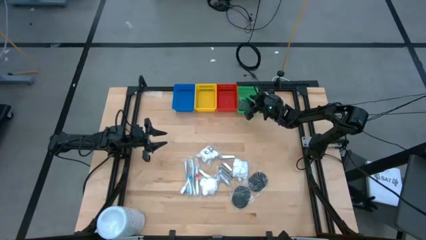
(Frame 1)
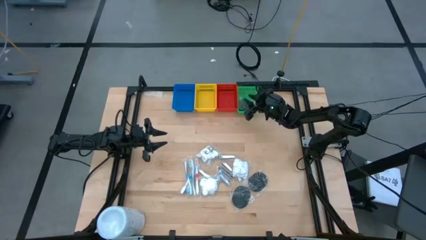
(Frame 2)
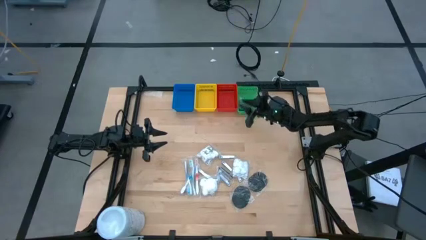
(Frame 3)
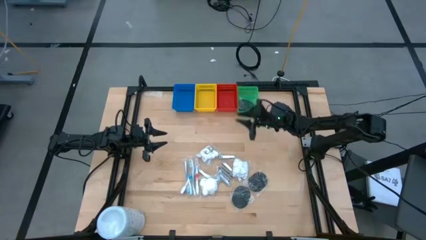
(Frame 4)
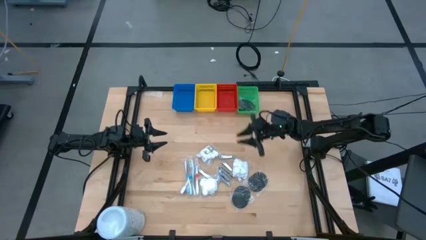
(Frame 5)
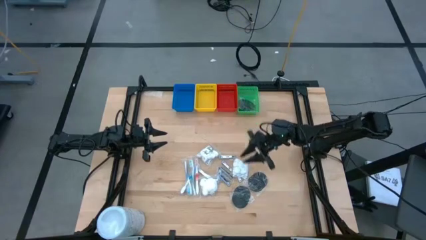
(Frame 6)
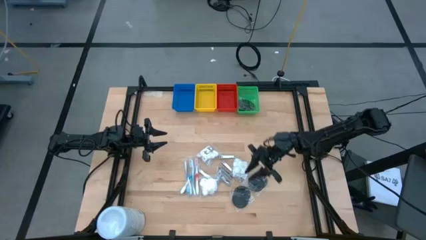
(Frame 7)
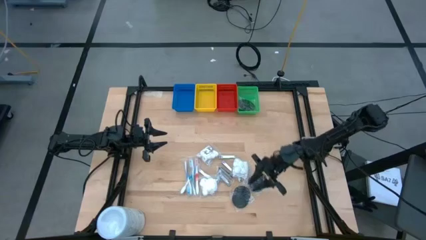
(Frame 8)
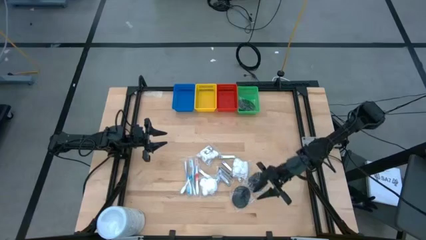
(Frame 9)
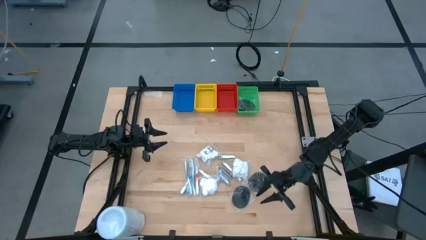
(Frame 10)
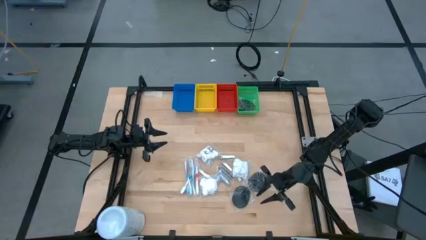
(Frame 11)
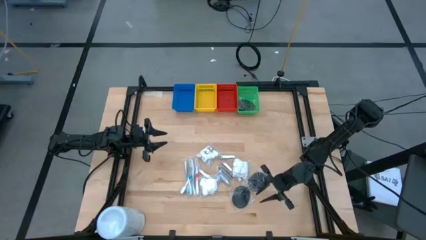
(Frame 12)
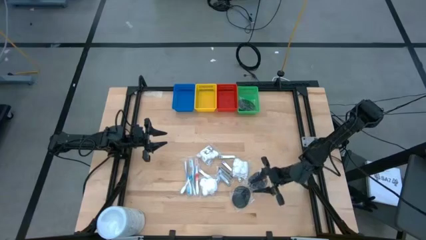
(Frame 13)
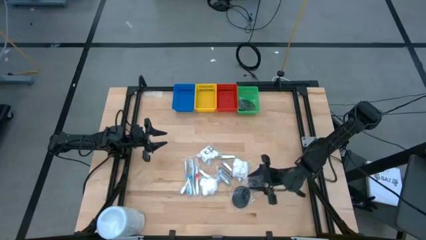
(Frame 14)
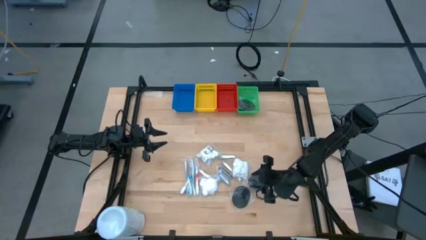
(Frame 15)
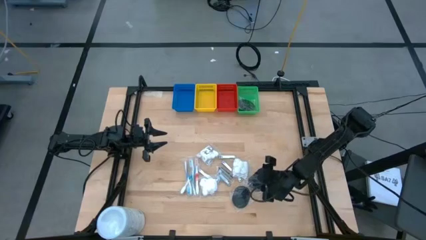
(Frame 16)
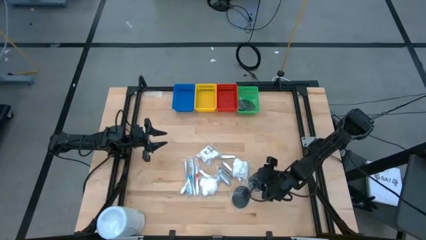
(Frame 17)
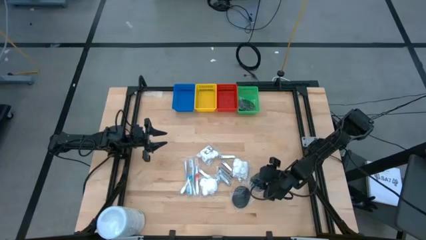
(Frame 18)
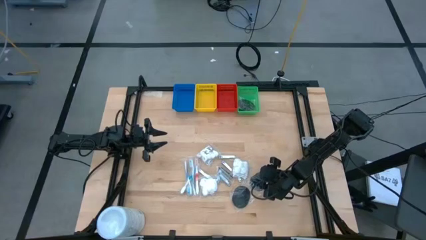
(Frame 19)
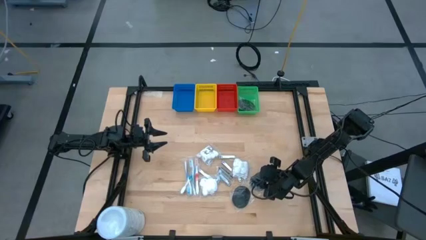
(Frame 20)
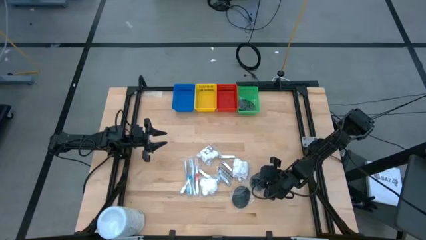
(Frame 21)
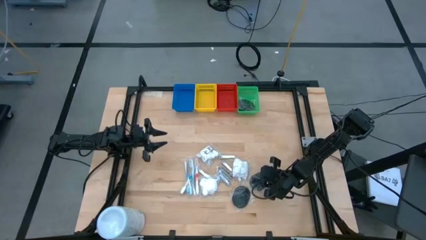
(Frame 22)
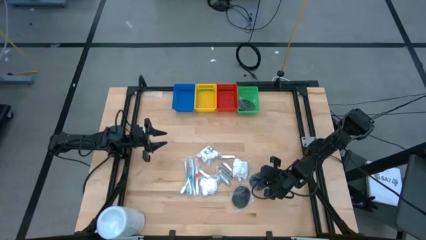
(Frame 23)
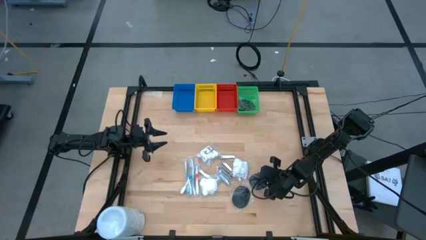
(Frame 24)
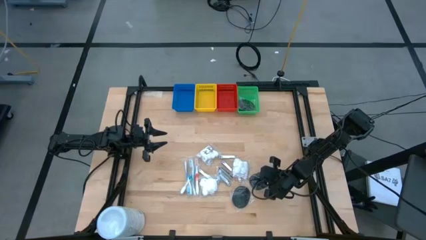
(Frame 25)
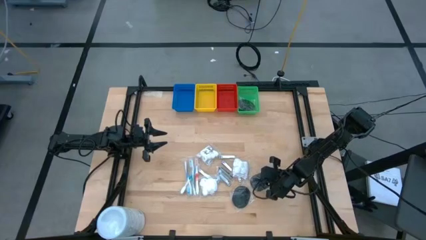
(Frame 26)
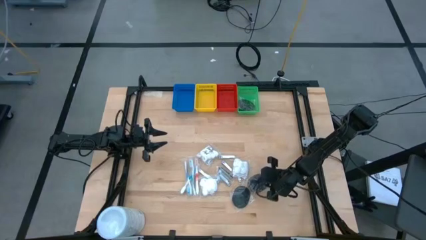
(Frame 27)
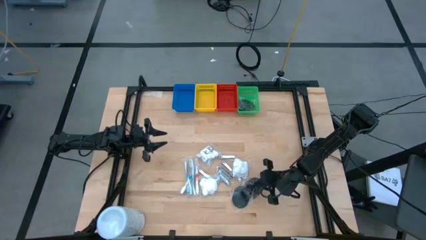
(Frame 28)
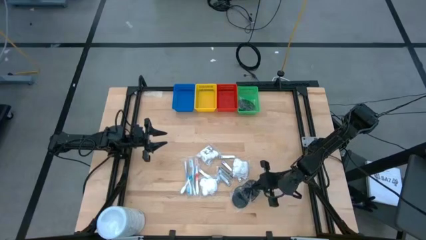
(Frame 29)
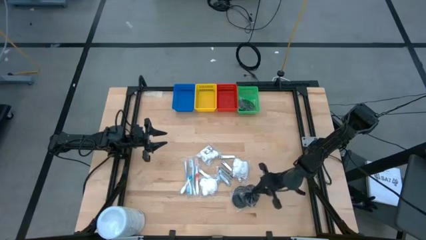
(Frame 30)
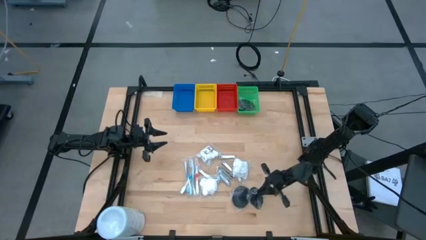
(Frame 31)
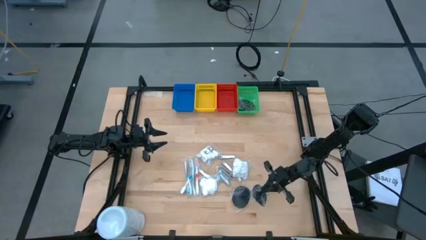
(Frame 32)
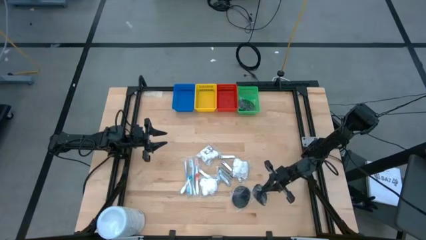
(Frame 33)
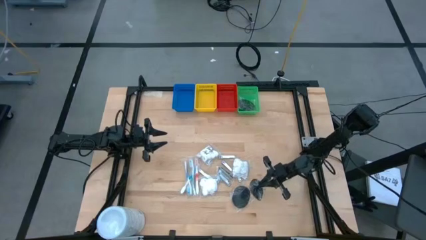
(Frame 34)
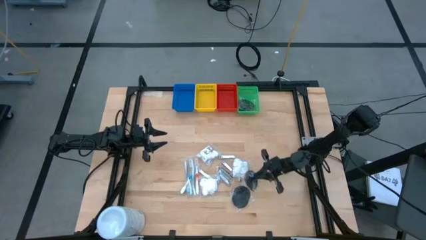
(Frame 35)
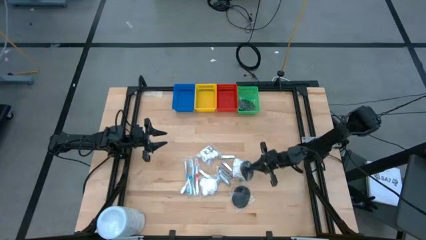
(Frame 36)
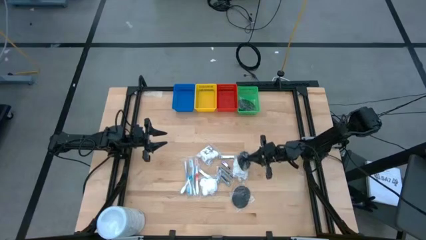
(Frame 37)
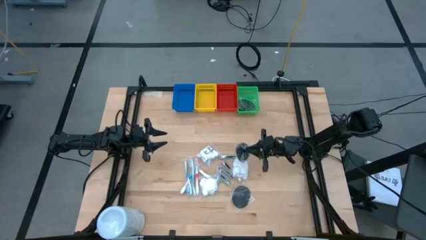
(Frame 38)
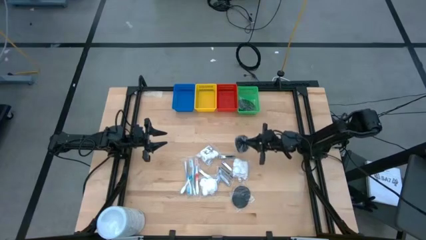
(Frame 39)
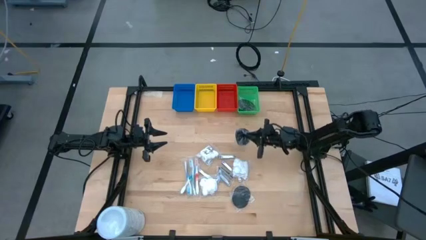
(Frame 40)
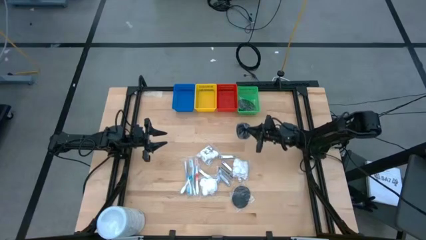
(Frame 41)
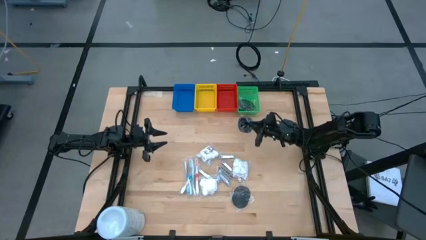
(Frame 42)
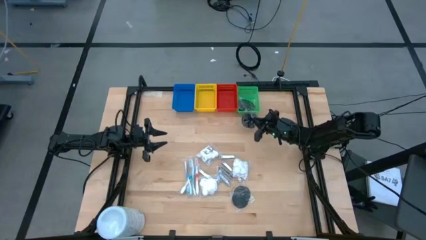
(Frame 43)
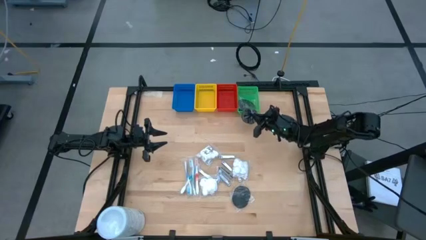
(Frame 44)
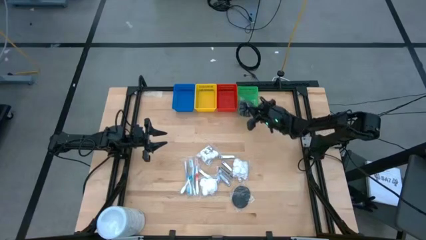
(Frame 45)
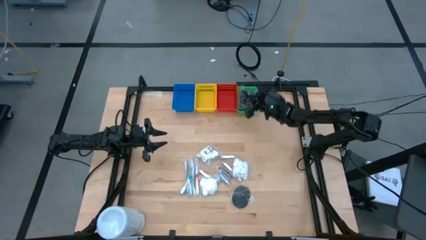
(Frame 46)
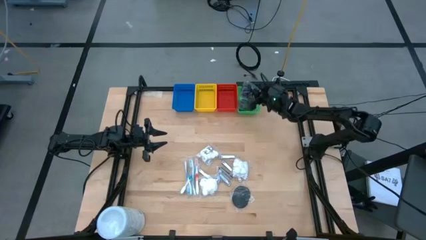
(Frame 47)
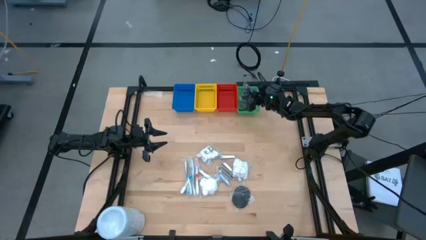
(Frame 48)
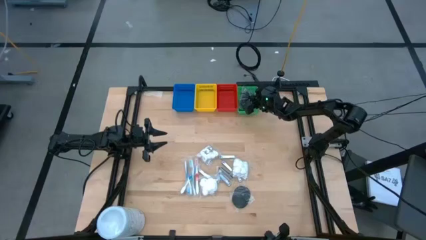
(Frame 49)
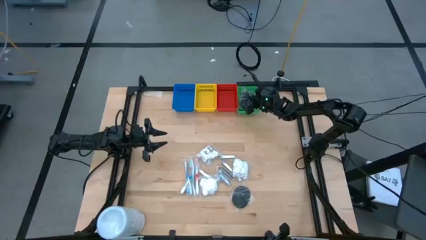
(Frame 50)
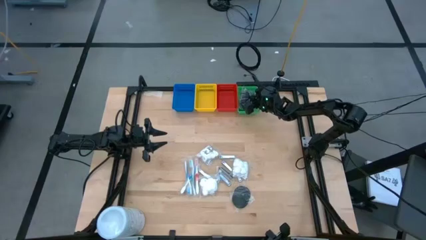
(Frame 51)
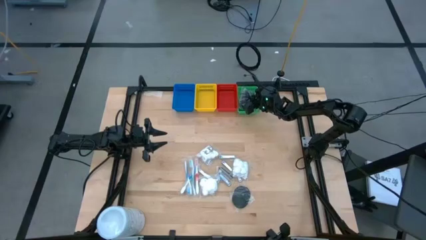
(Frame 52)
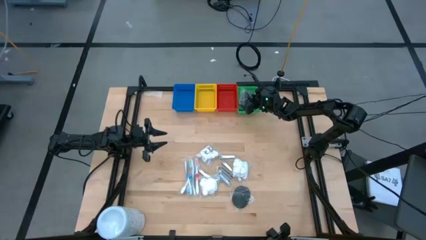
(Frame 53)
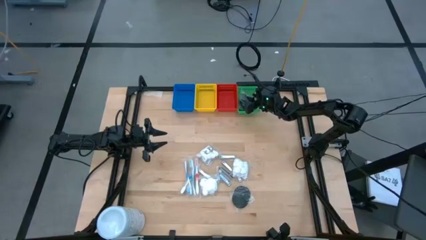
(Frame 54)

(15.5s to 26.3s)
Task: Pick & Place Travel size toiletries
Put the hairbrush into the green bin

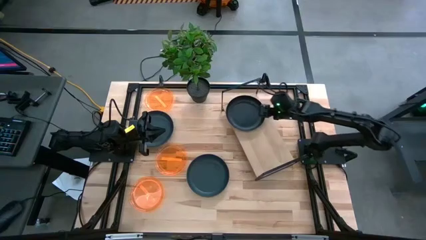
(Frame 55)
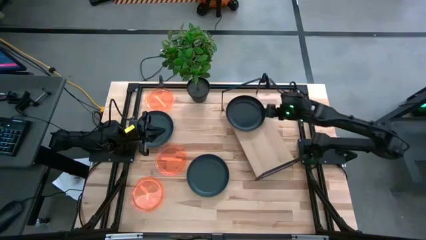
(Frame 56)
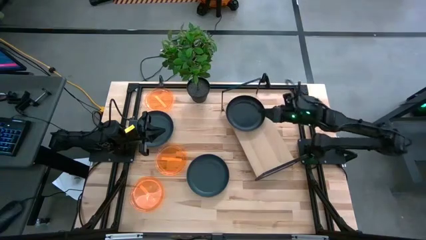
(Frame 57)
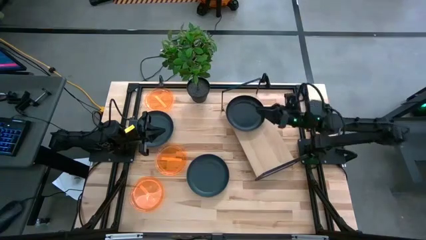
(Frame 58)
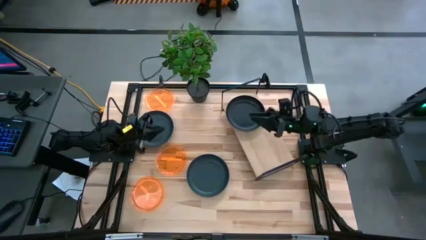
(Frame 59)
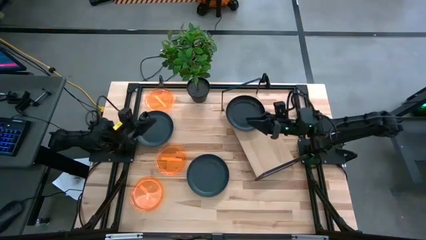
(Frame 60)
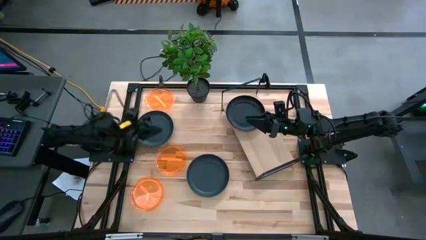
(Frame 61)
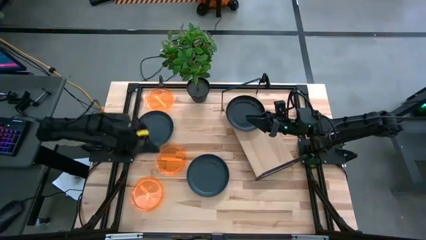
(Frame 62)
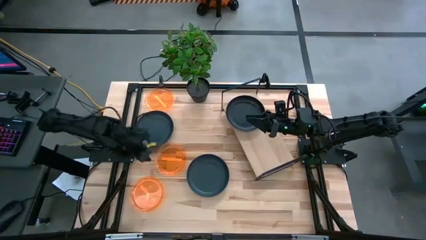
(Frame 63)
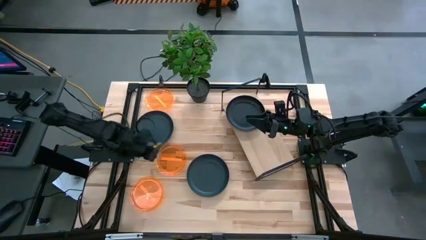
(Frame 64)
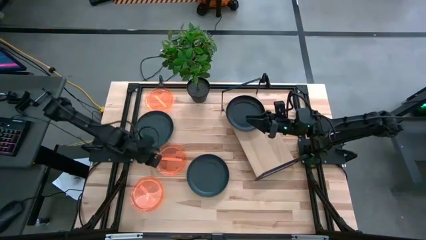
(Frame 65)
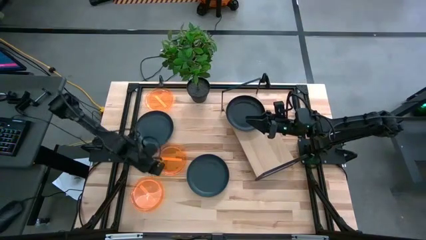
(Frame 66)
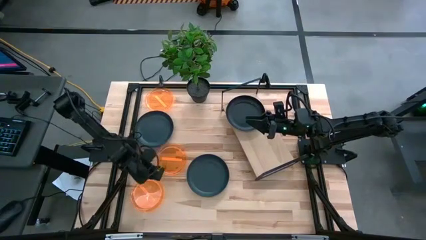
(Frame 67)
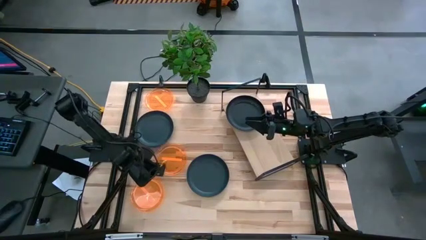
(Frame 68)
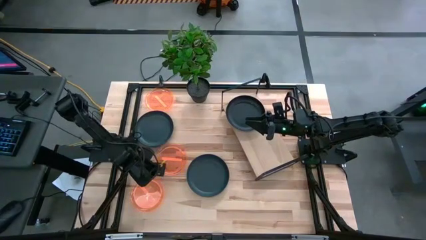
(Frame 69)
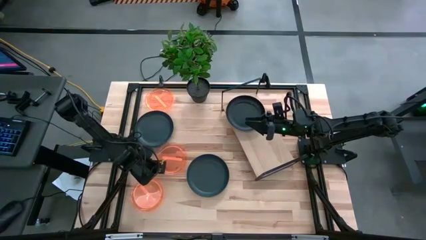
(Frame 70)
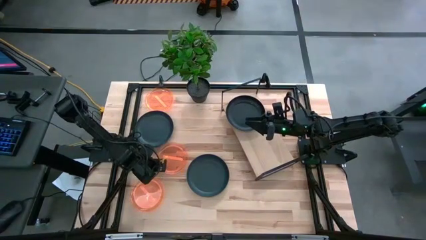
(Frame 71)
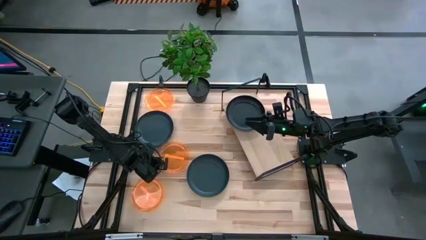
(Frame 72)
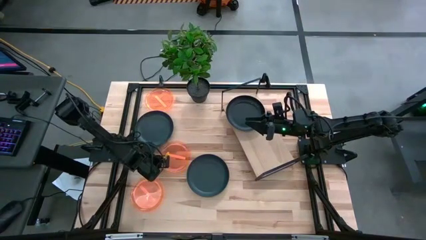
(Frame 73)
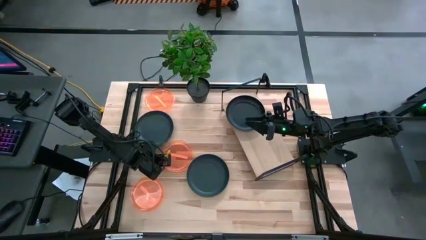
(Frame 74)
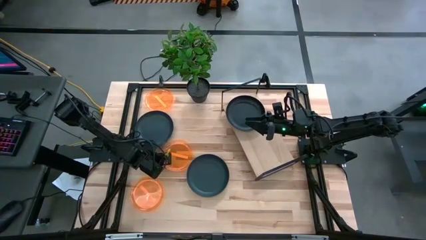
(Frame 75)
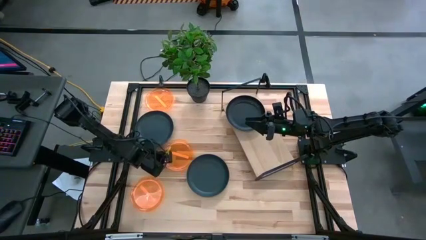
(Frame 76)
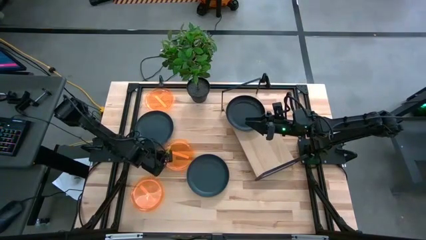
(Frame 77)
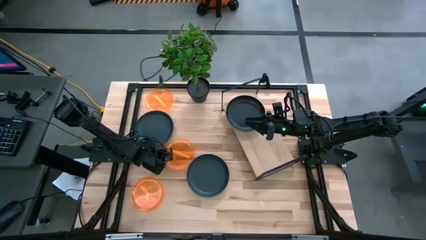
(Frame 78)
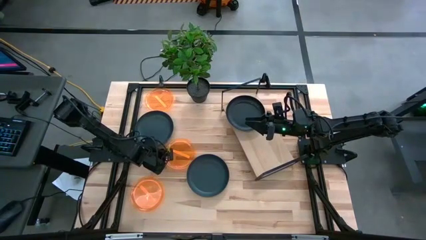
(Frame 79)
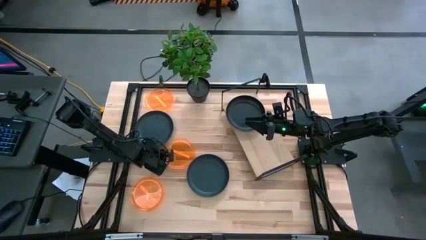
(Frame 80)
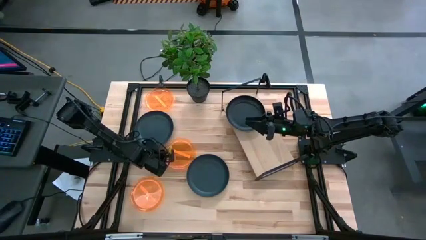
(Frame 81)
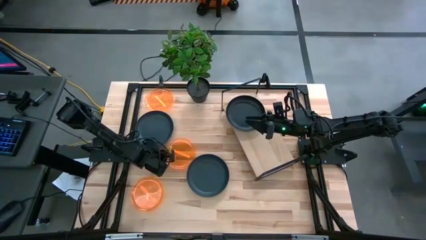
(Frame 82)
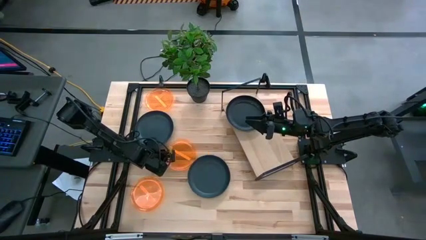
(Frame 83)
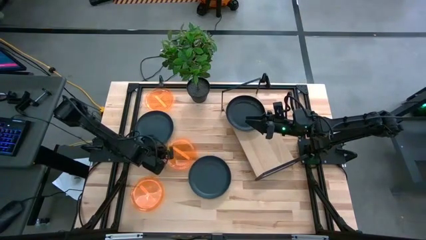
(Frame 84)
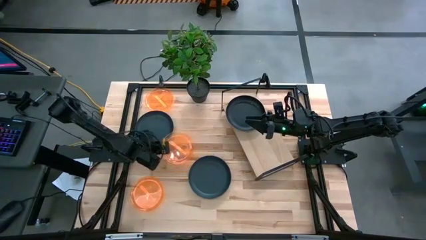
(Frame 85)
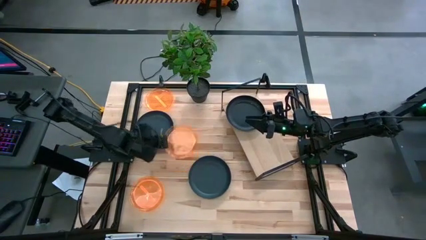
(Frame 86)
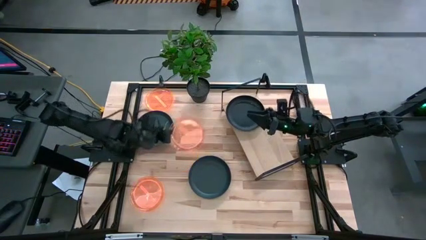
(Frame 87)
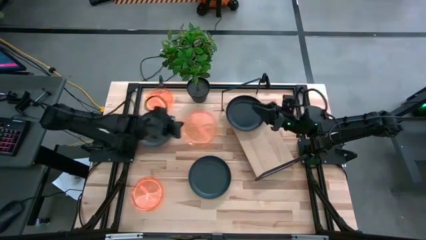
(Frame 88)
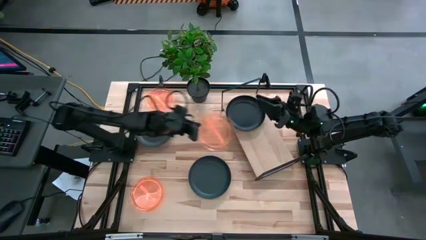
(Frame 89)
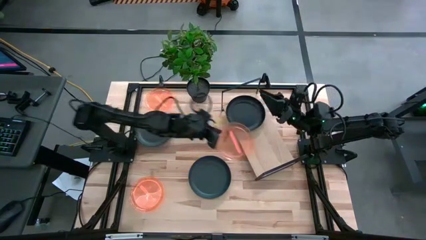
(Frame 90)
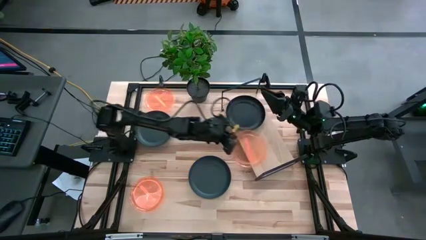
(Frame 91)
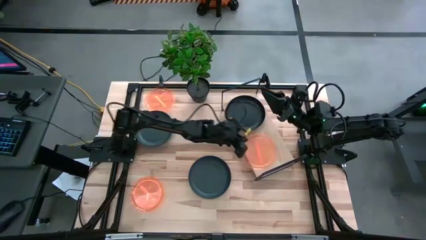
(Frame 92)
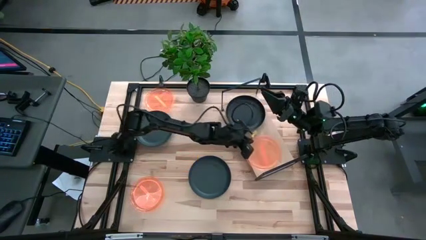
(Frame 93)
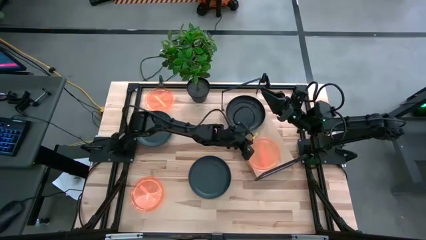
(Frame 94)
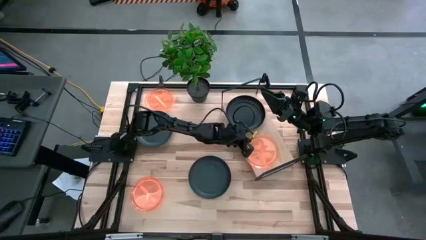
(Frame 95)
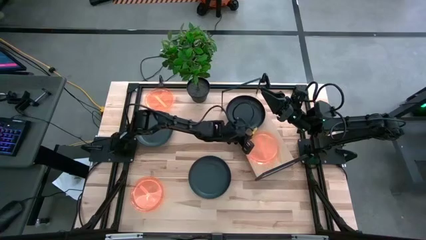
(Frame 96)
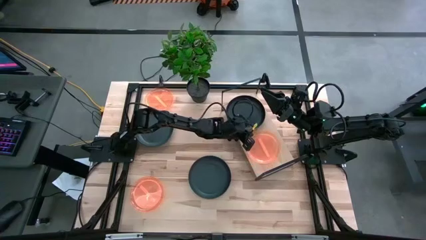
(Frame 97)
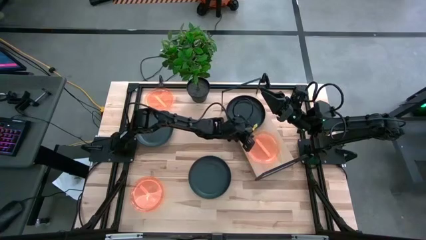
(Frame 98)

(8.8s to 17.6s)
Task: Place and stack plates onto a shelf
Put the right orange plate on the shelf
